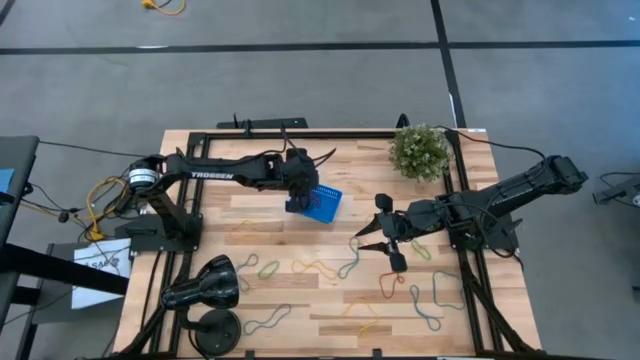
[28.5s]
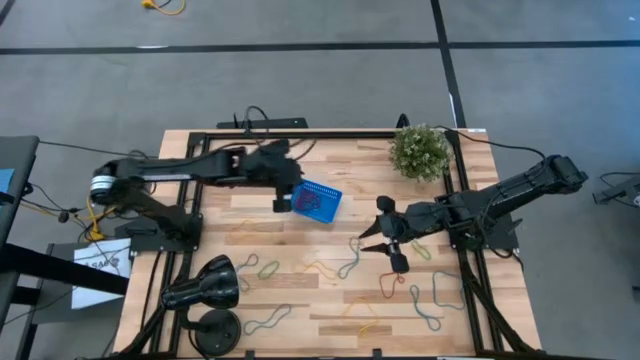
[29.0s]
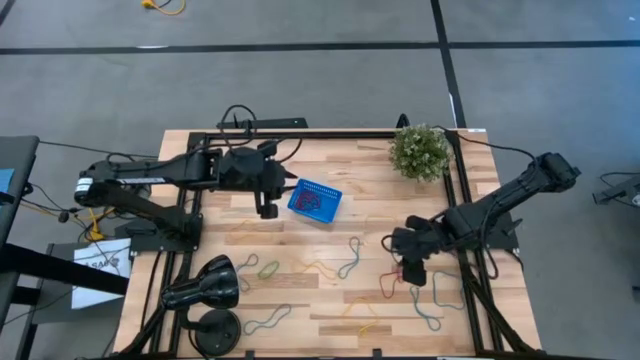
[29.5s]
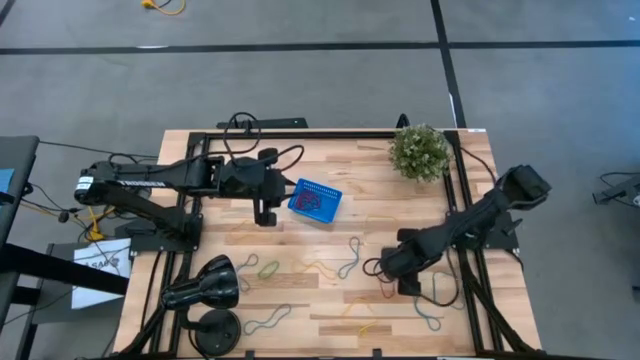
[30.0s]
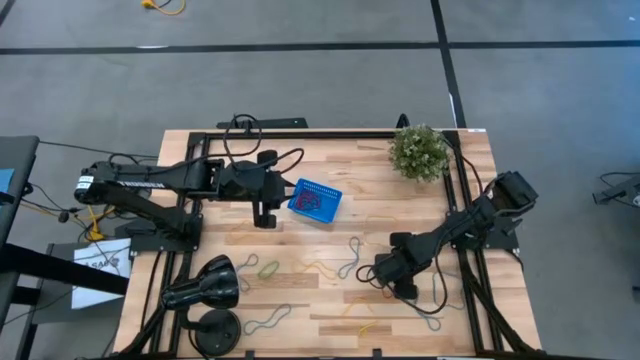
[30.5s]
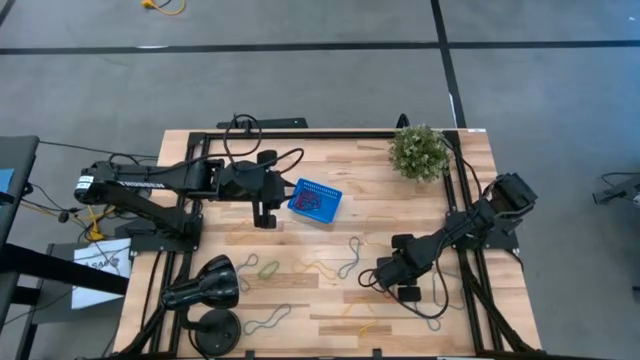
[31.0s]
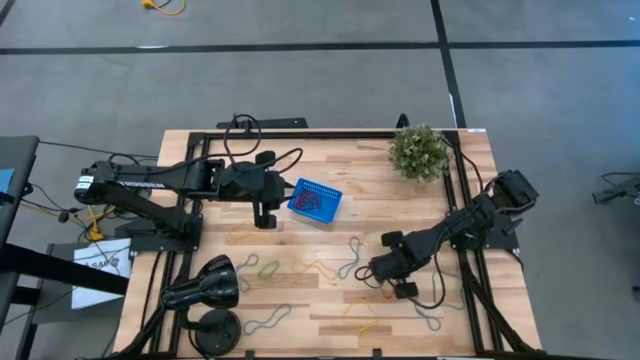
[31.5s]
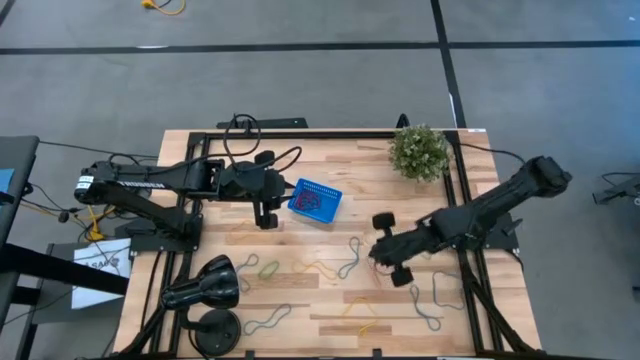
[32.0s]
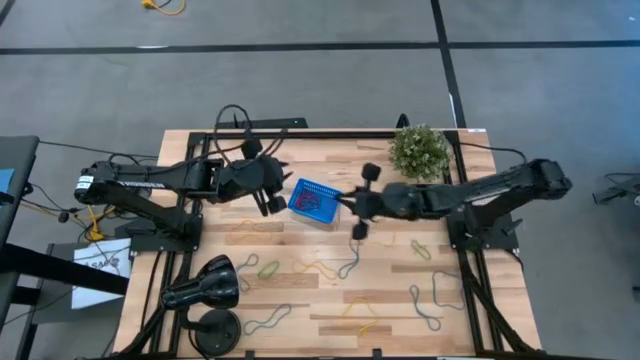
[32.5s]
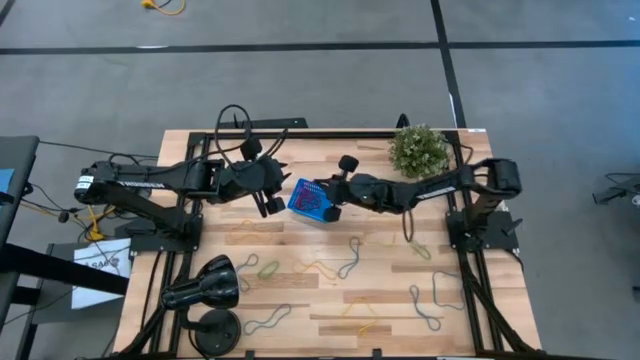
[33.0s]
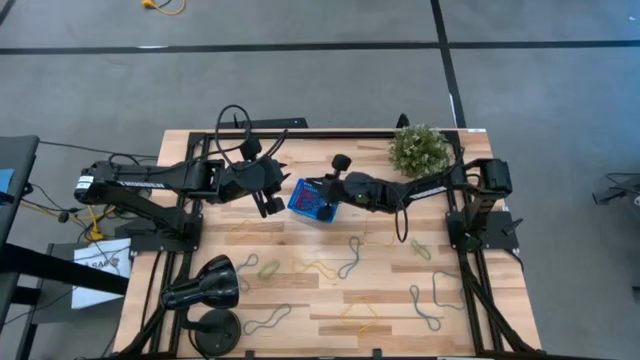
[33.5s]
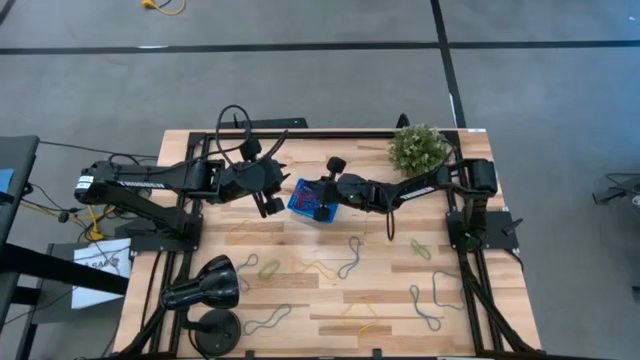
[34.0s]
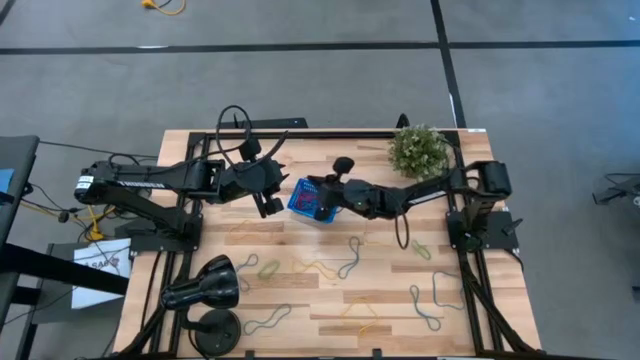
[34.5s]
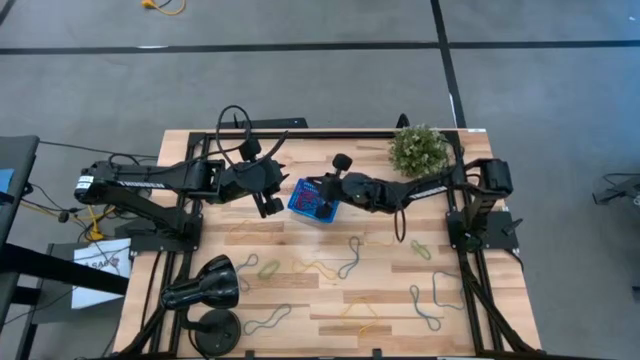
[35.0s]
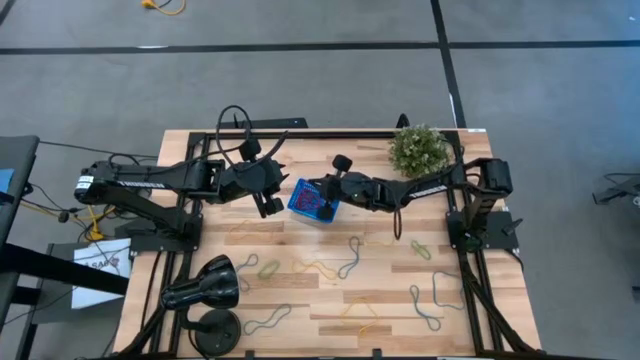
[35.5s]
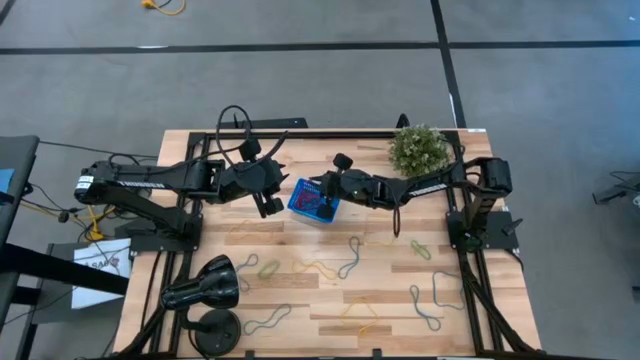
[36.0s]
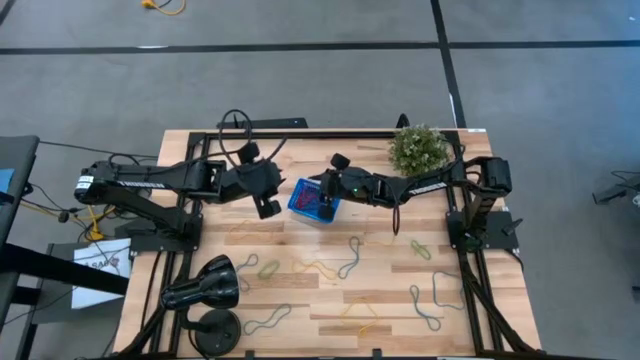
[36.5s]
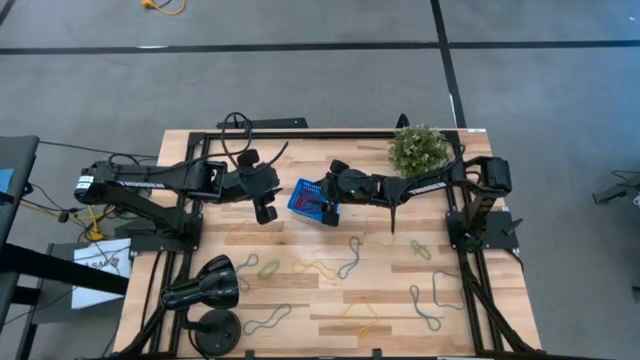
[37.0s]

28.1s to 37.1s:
Task: Pick and place items into bin
Put the red rubber band into the blue bin

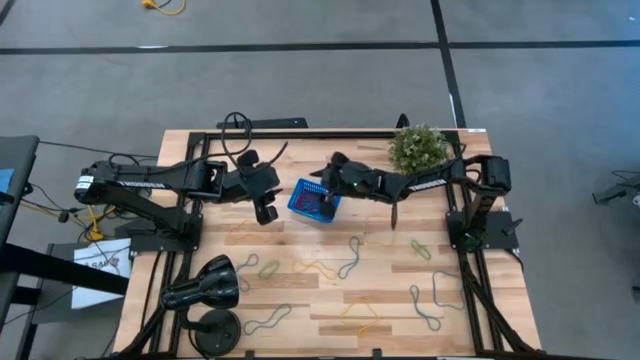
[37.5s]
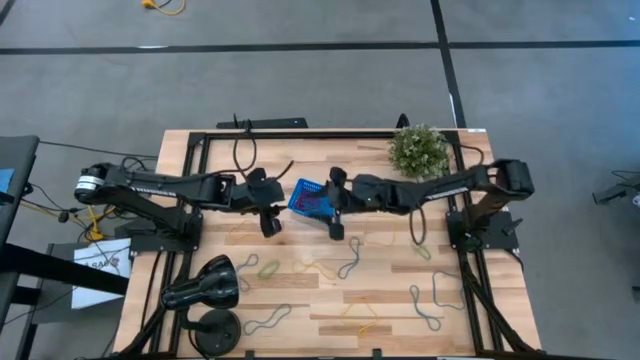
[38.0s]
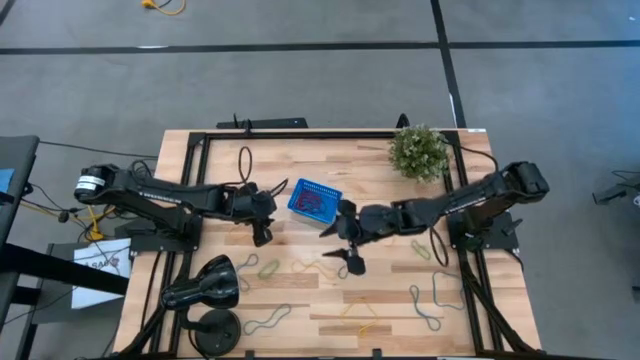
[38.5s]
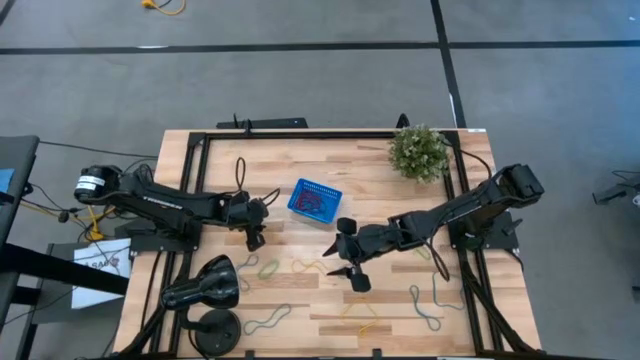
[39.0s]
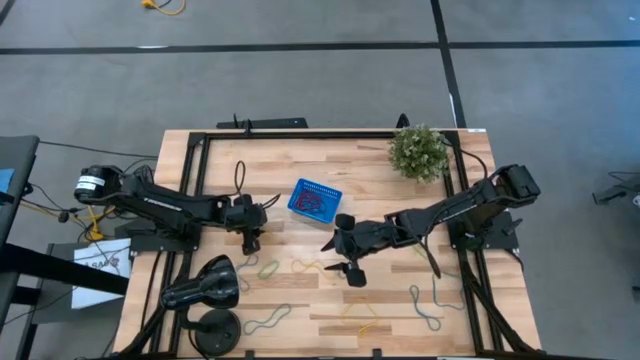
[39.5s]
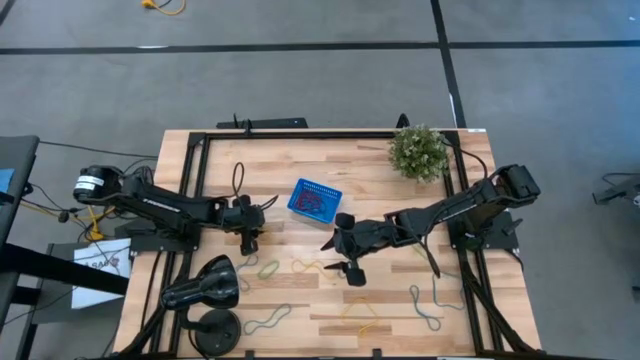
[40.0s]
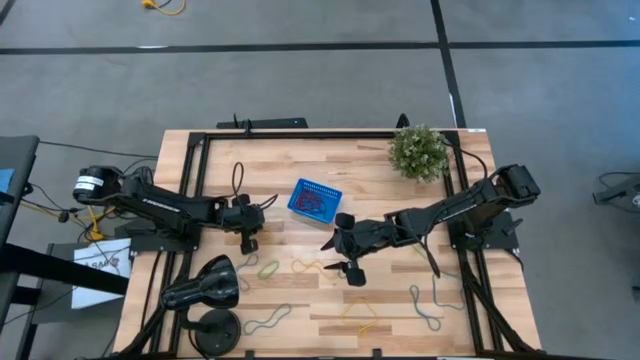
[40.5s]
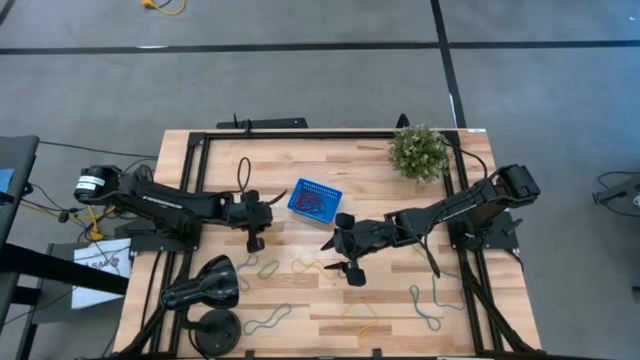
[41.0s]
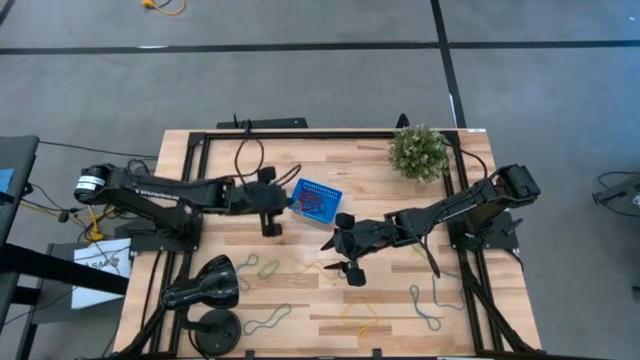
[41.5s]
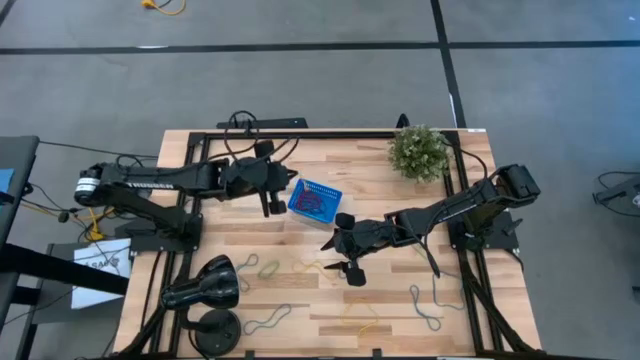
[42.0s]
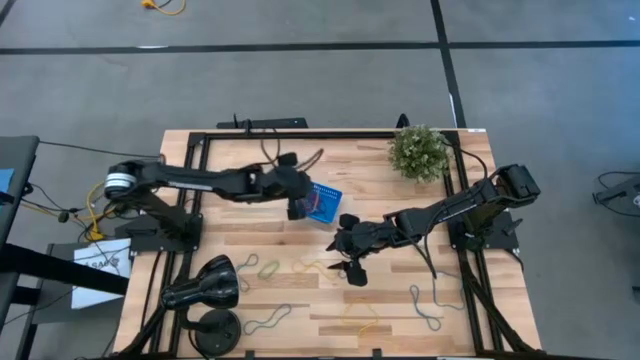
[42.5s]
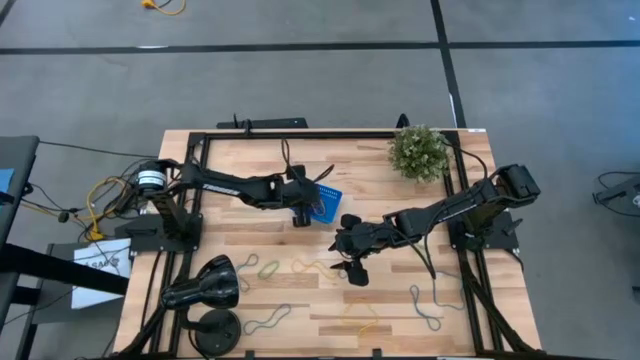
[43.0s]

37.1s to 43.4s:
Put the yellow rubber band into the blue bin

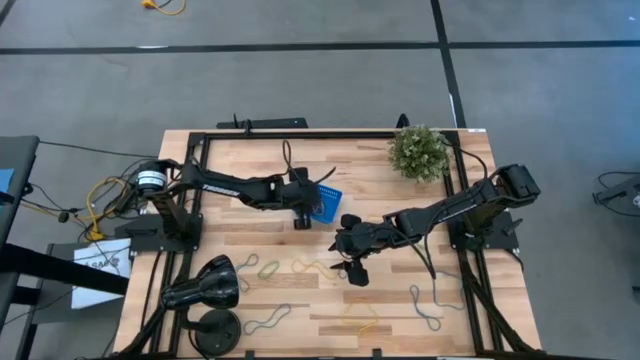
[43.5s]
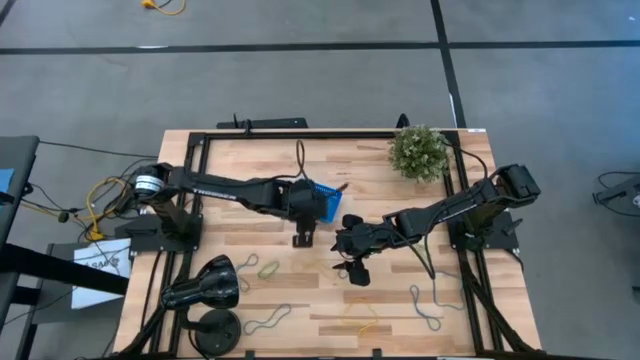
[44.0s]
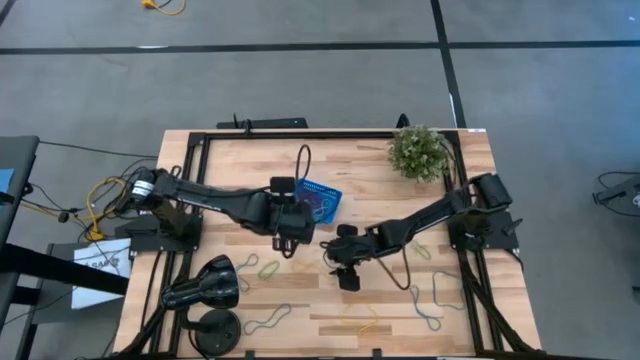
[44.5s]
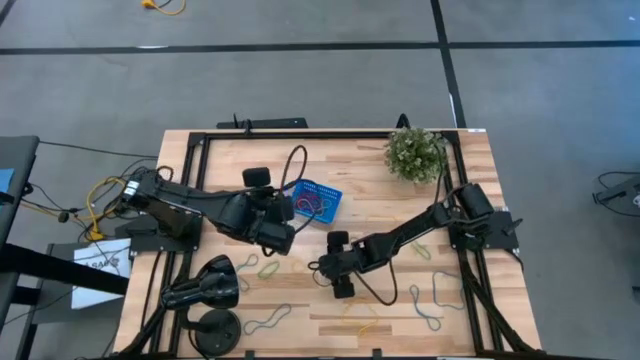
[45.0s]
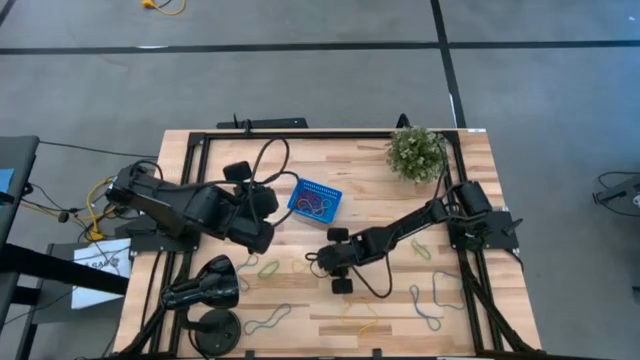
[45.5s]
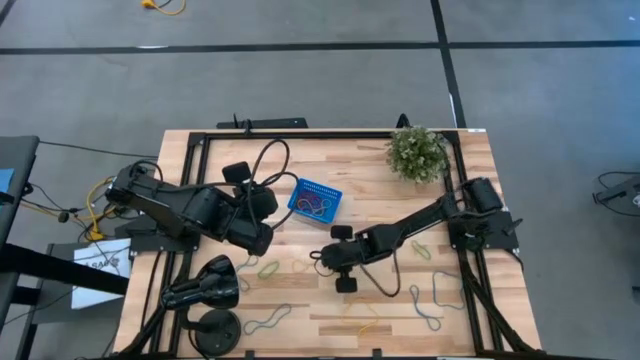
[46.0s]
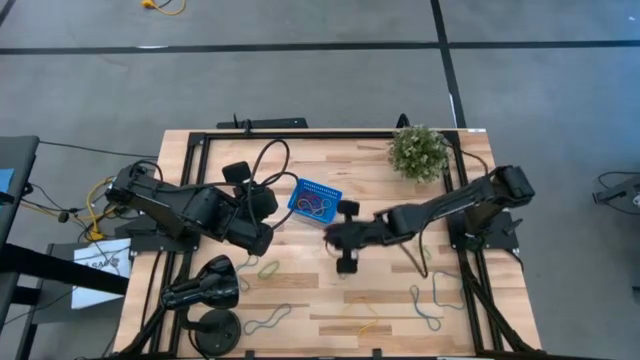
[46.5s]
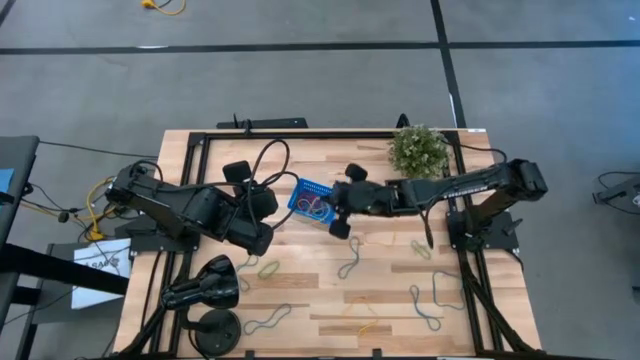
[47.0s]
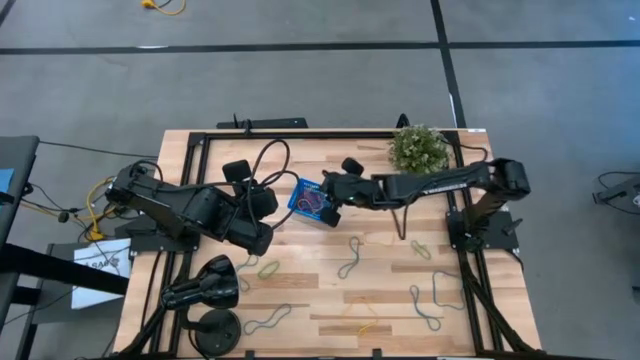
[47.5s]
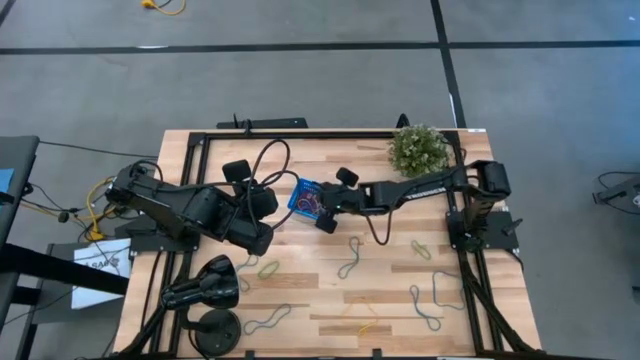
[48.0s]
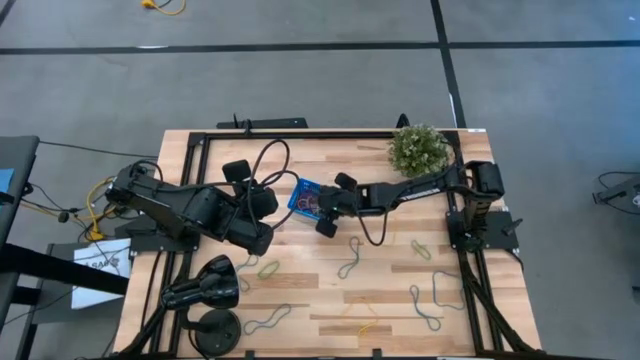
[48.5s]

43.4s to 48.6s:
Put the yellow rubber band into the blue bin

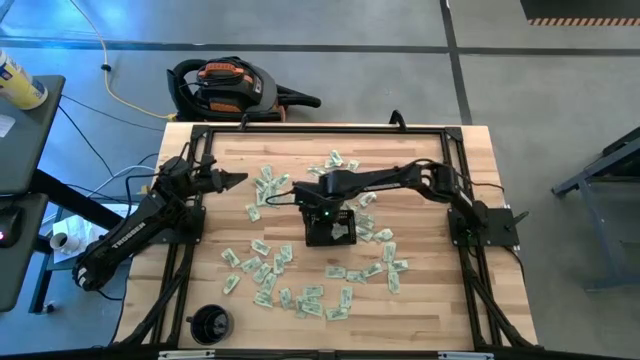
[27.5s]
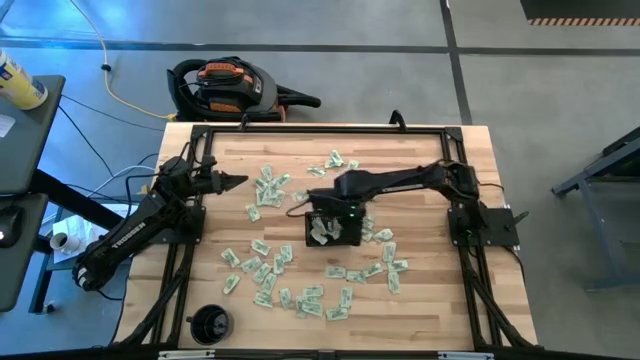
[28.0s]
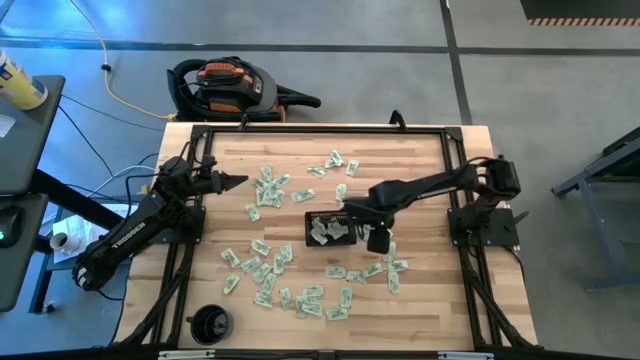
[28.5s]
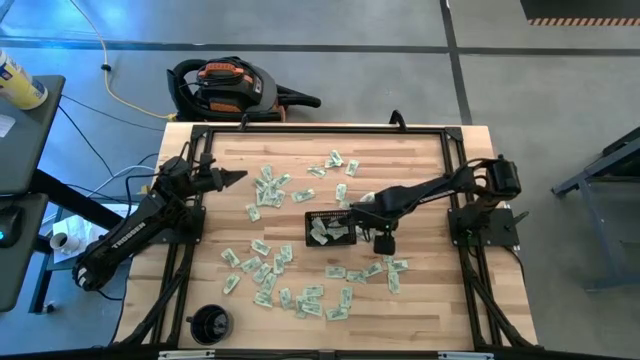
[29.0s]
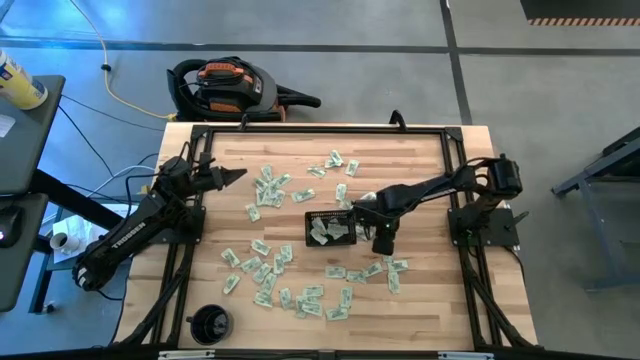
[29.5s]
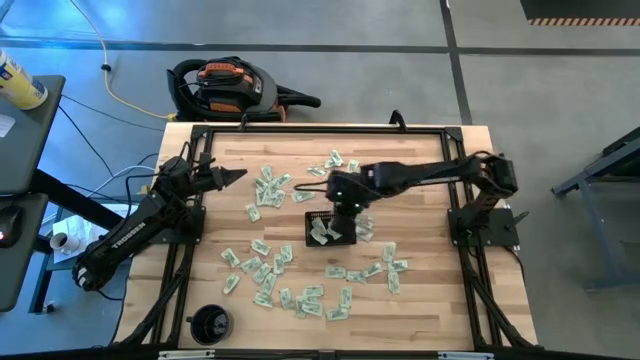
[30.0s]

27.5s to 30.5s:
Task: Pick and place Stevia / Truvia into bins
Put the green stevia packet into the black basket
